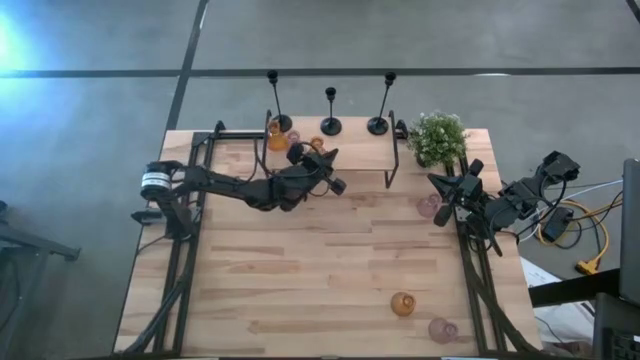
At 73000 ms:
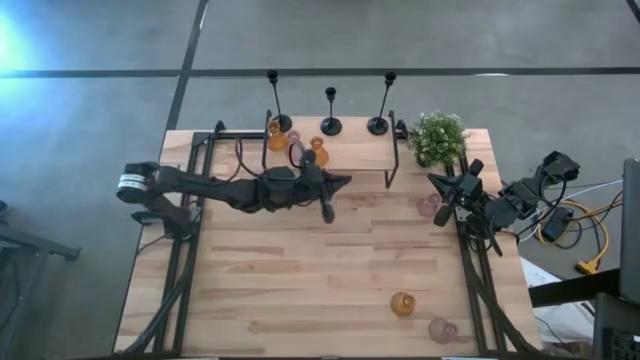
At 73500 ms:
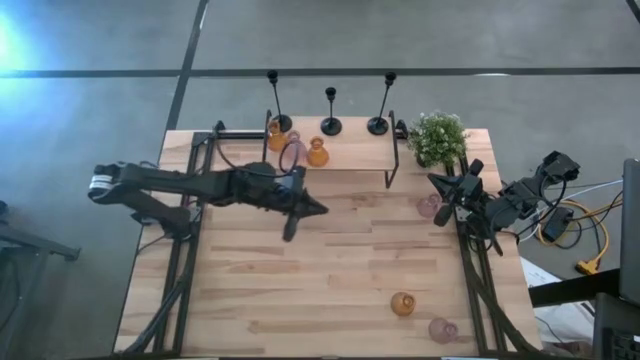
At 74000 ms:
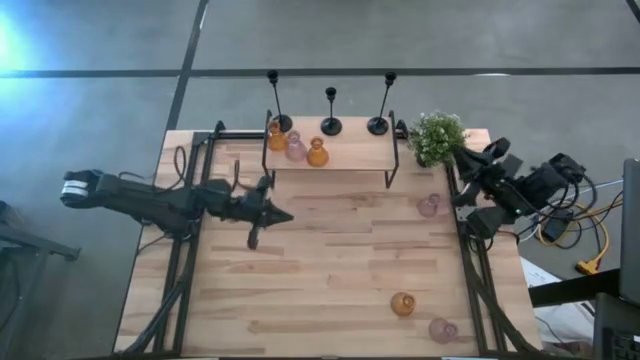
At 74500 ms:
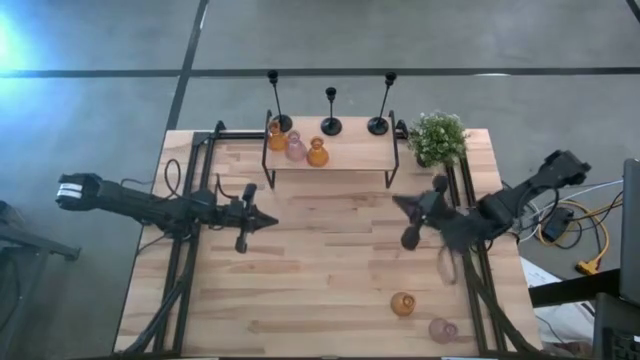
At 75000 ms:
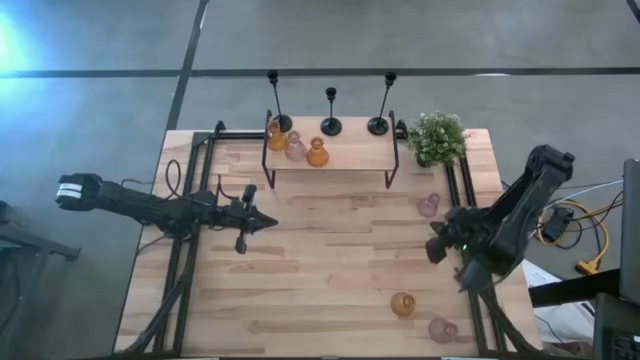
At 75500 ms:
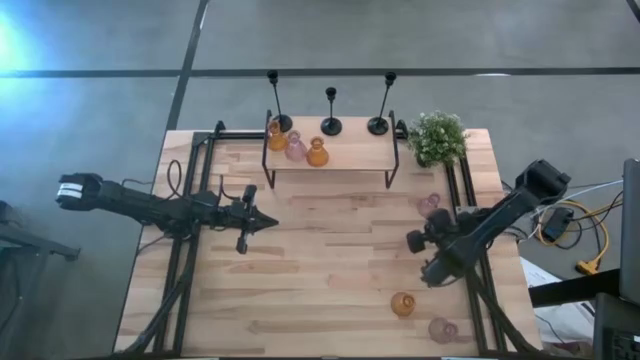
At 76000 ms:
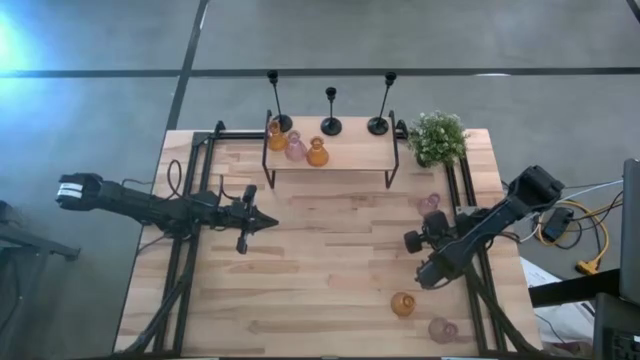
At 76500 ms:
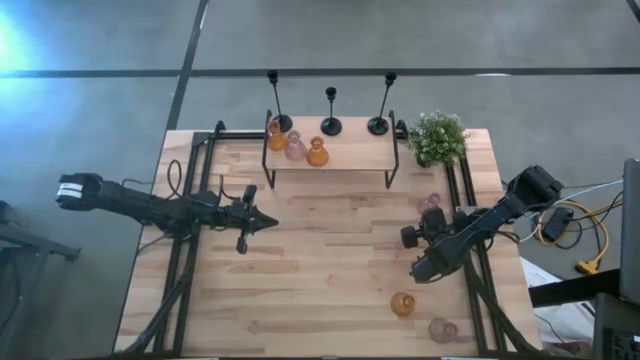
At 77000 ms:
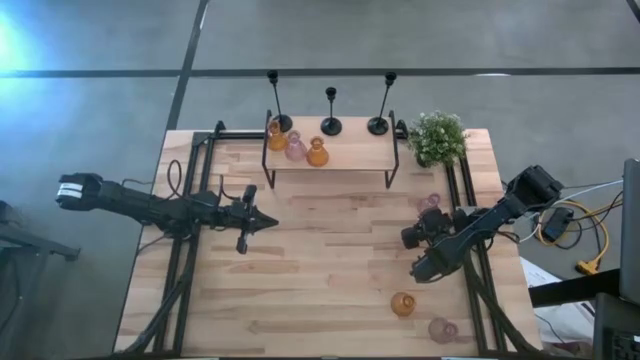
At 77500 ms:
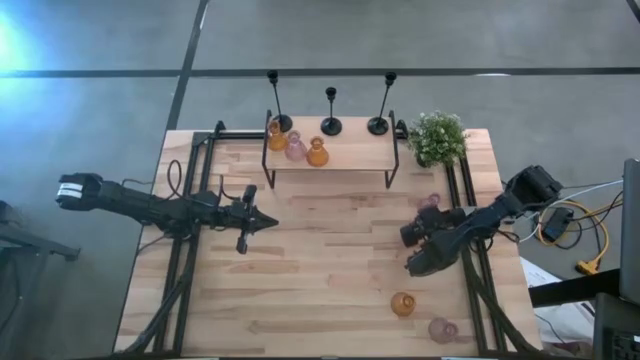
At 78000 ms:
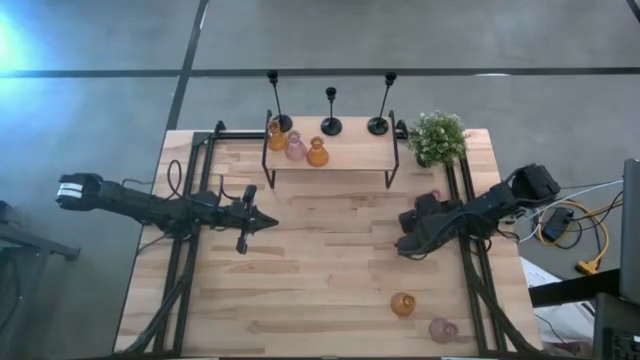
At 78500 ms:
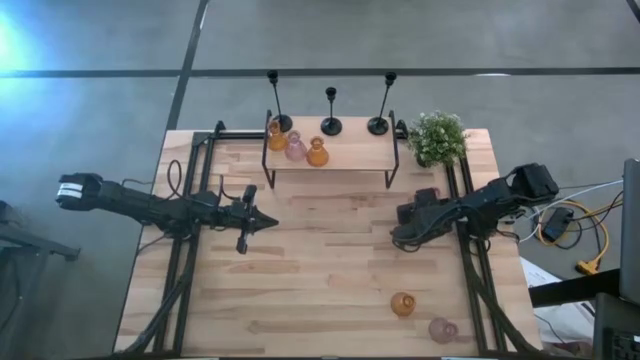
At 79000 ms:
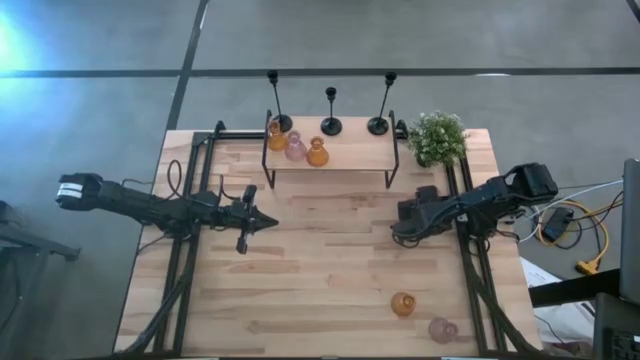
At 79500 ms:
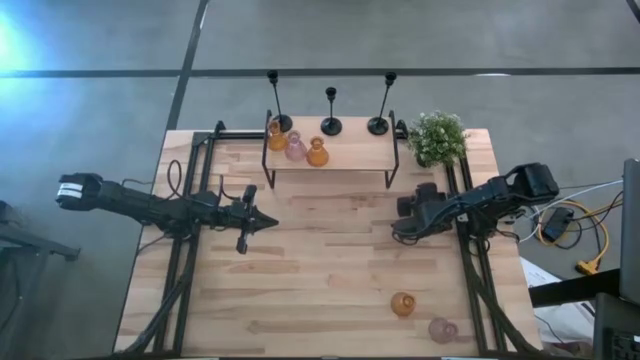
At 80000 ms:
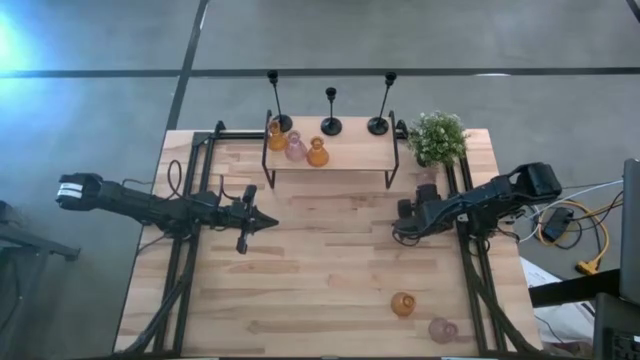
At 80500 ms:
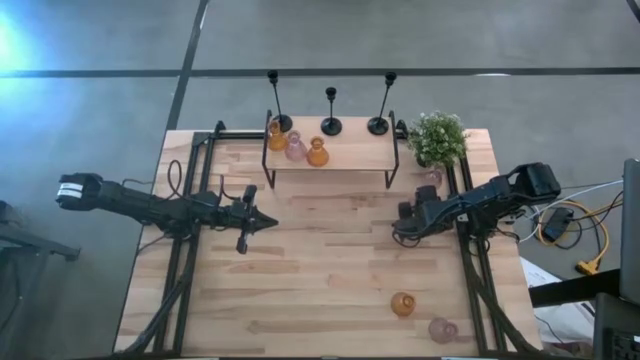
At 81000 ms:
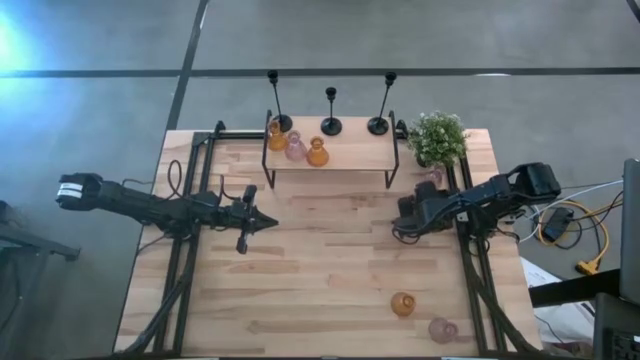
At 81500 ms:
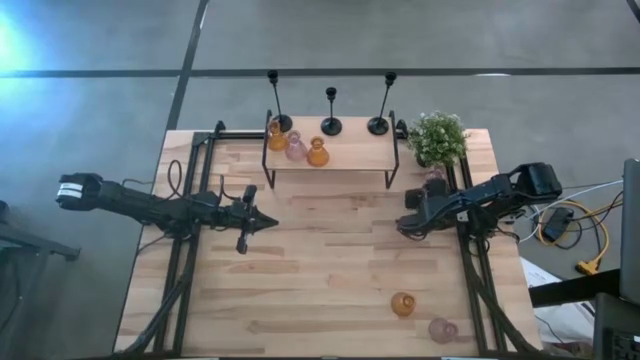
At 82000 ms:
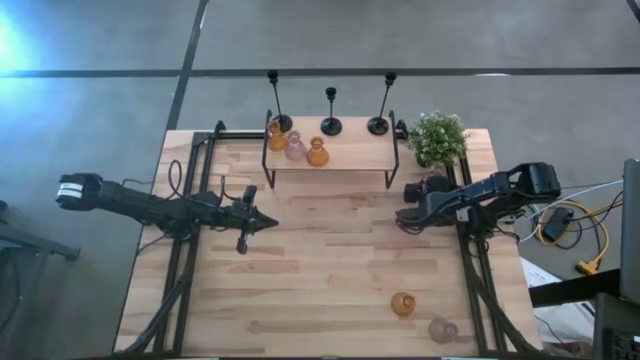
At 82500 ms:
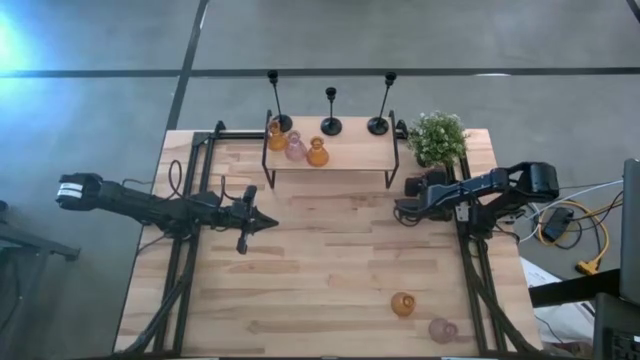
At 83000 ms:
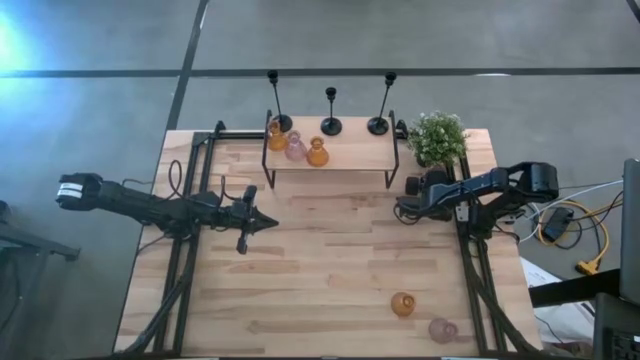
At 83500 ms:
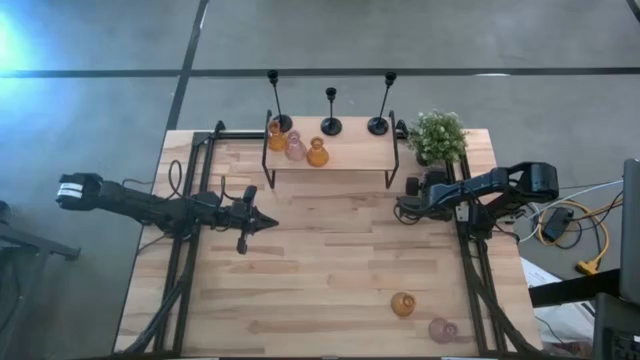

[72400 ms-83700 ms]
Task: Pick & Place candle stick holders
Put the top pink glass candle holder on the shelf

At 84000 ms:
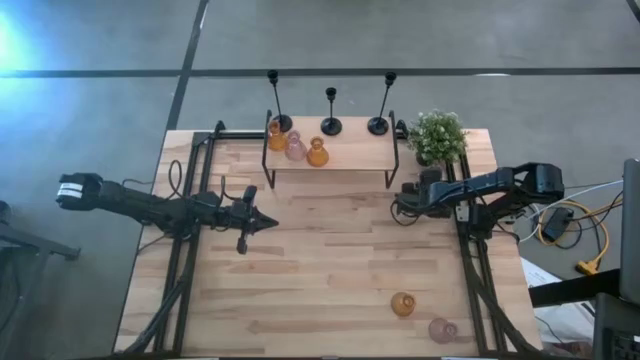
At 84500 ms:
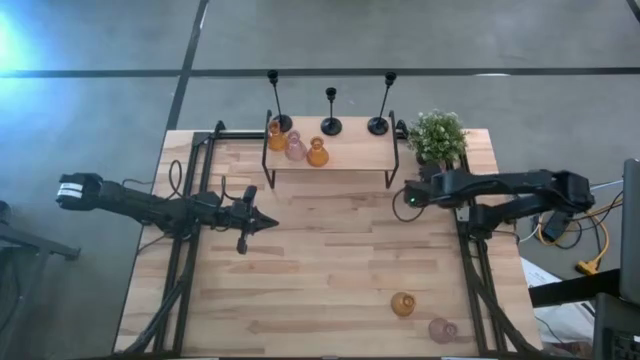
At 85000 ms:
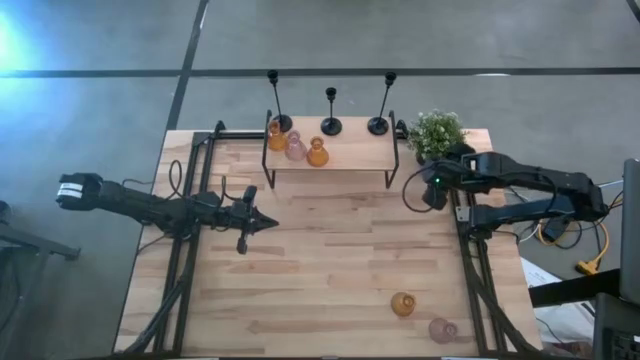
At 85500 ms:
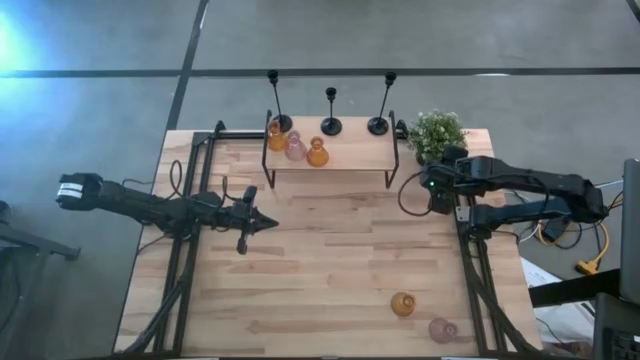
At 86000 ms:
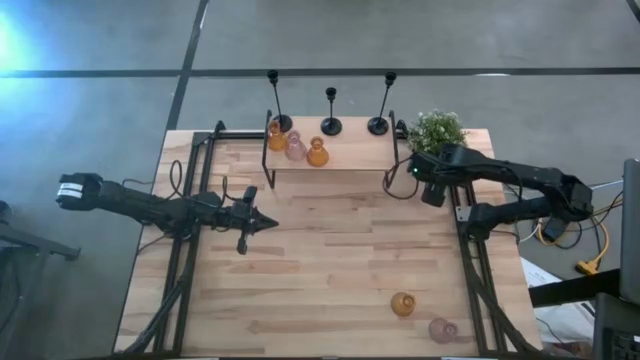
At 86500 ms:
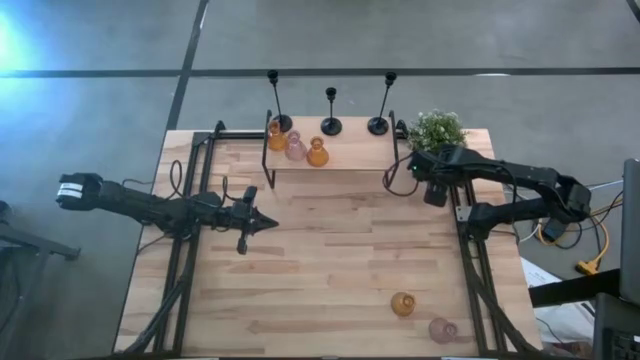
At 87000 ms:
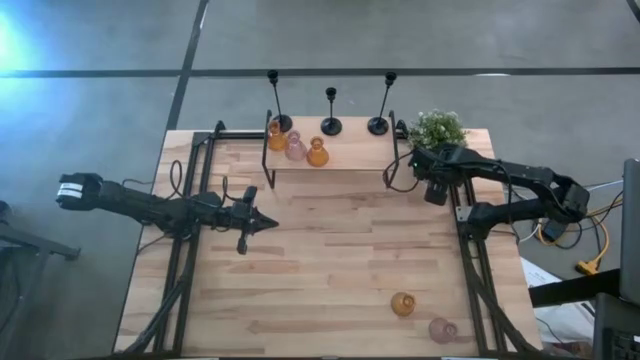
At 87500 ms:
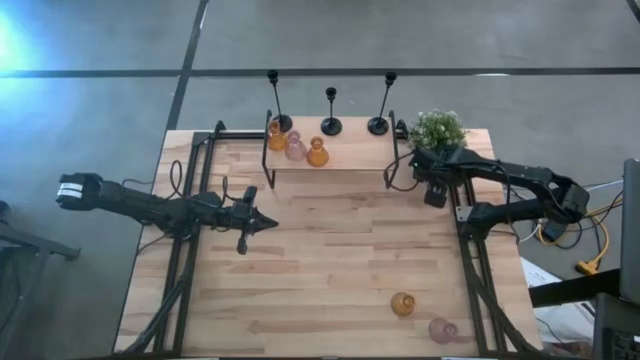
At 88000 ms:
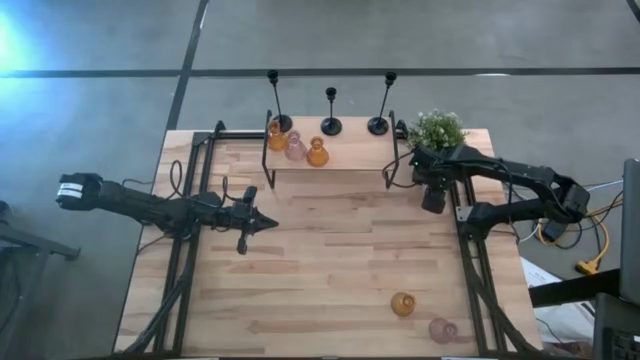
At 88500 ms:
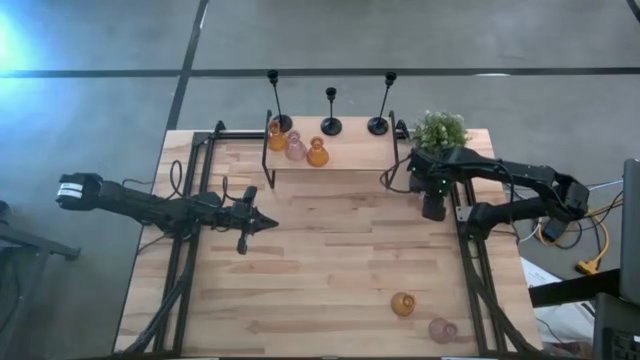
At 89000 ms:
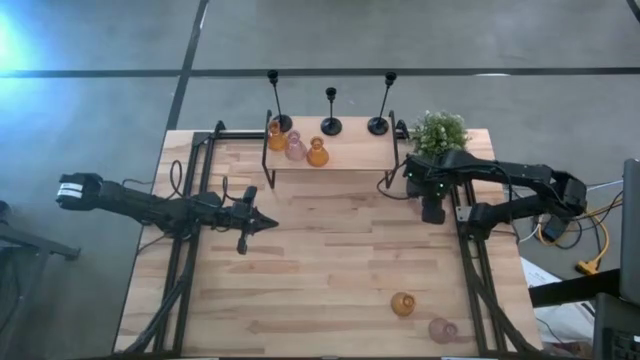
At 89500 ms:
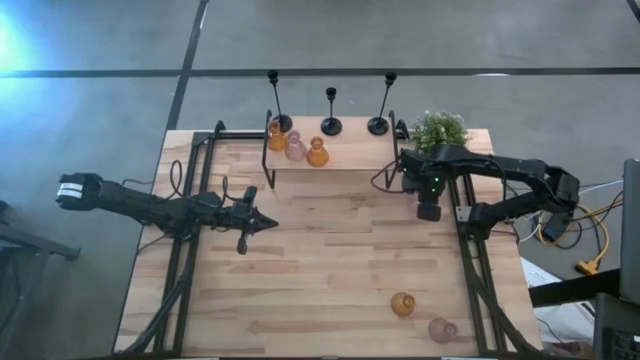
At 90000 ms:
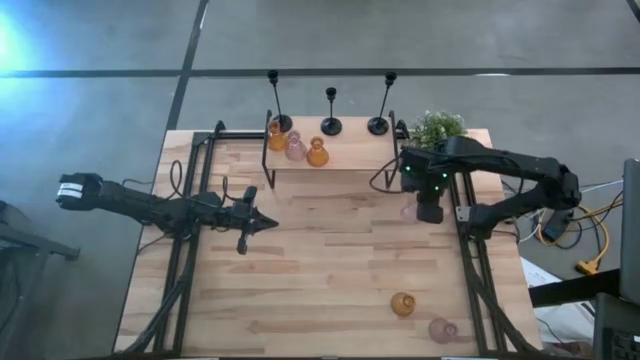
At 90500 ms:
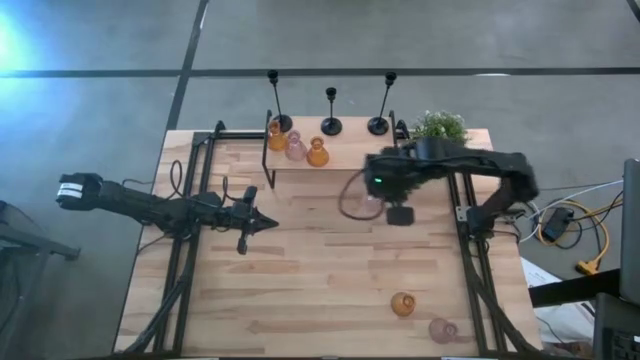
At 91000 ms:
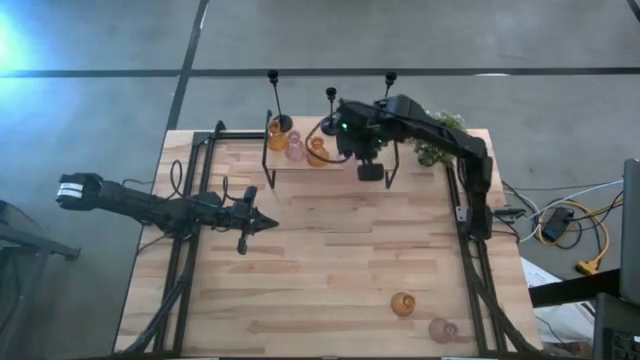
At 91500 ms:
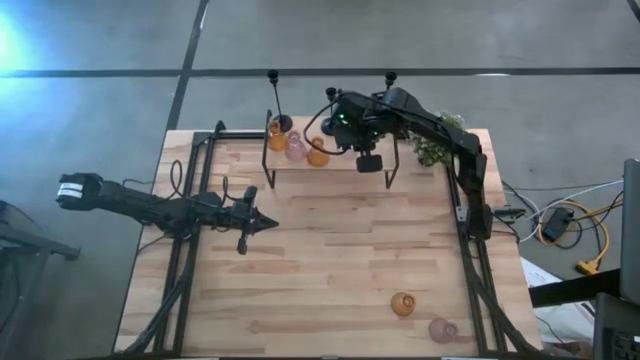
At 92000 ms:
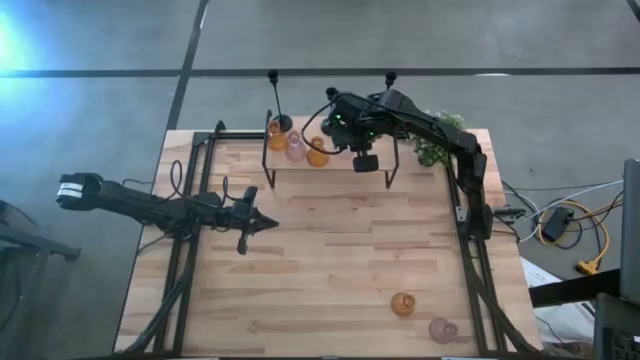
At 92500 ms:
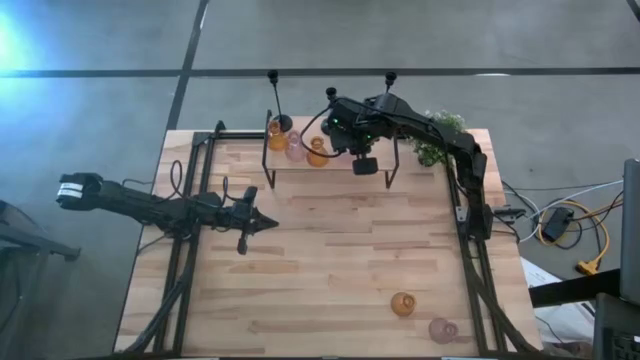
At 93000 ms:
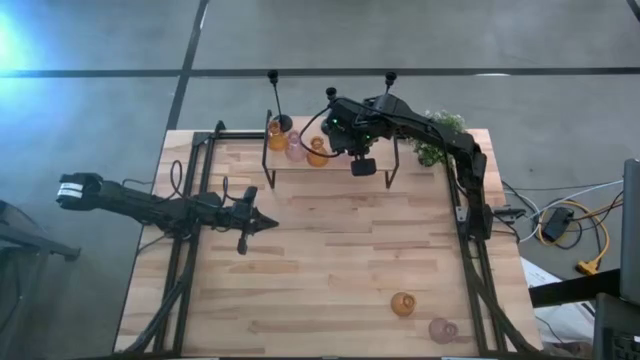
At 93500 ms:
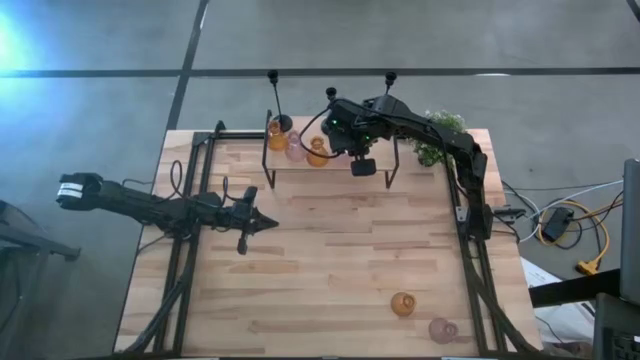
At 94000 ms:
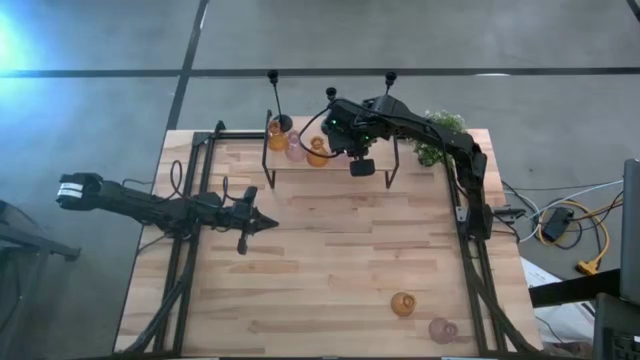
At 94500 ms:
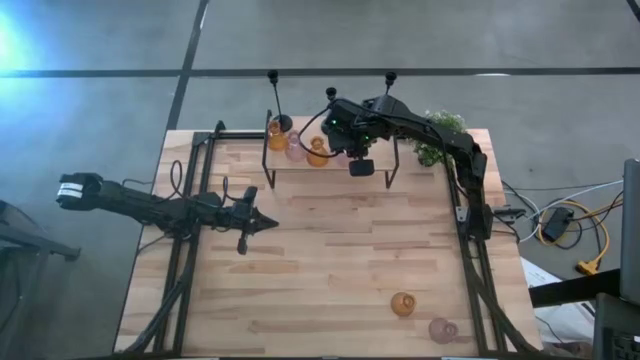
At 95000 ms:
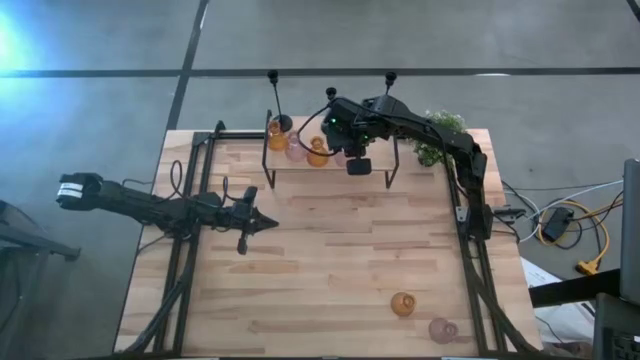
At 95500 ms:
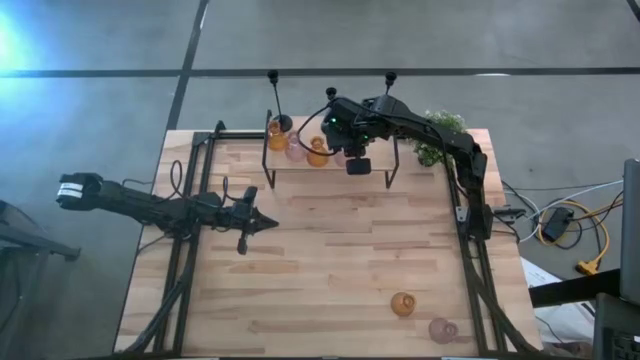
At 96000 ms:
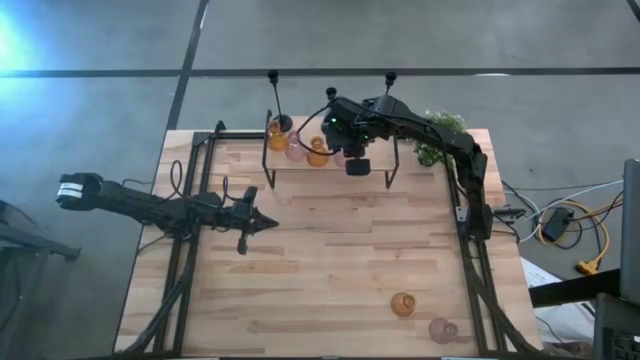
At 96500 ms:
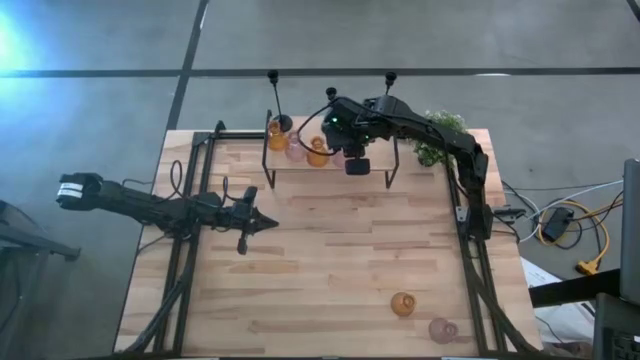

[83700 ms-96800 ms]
Put the top pink glass candle holder on the shelf
